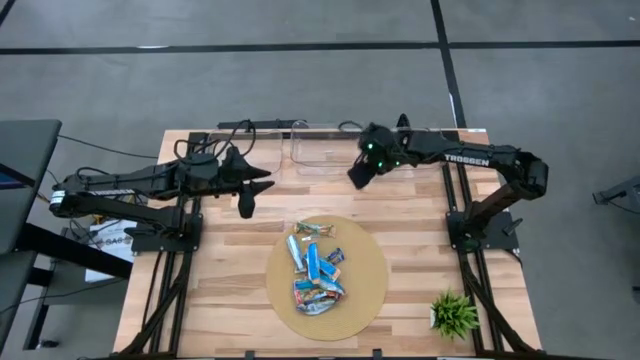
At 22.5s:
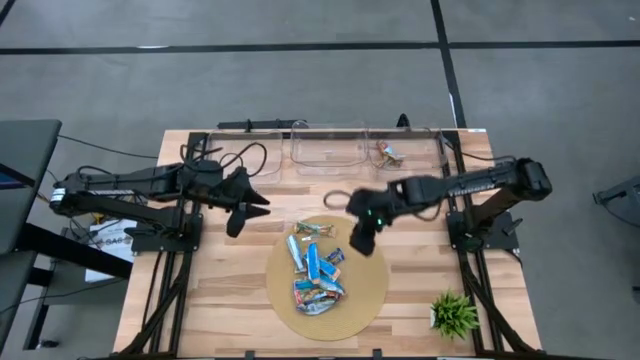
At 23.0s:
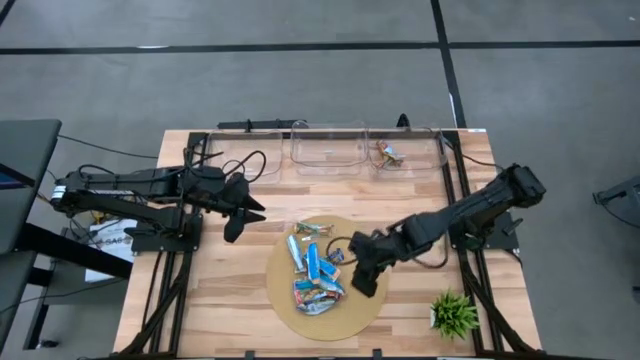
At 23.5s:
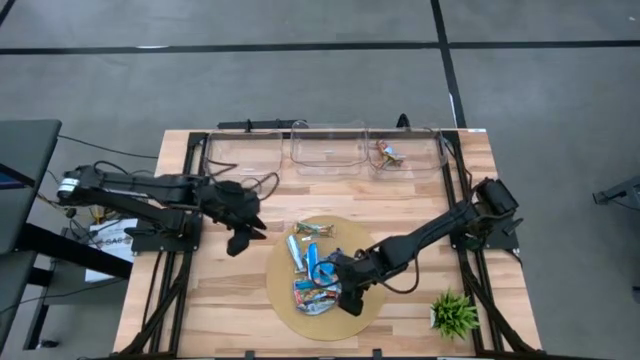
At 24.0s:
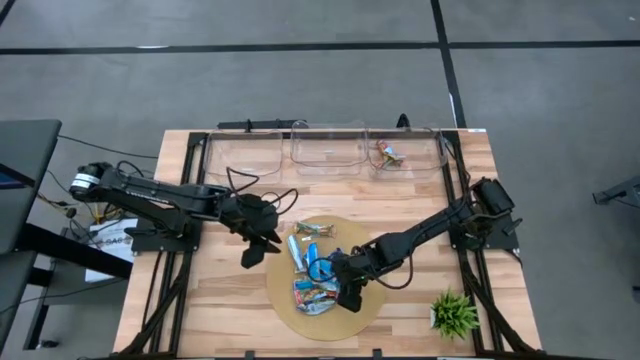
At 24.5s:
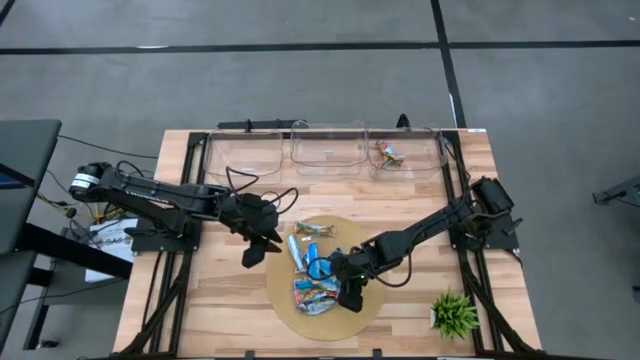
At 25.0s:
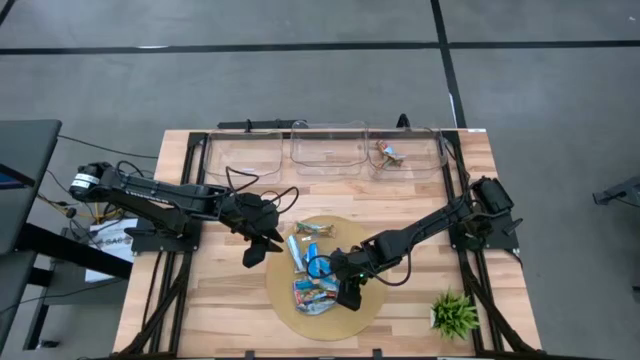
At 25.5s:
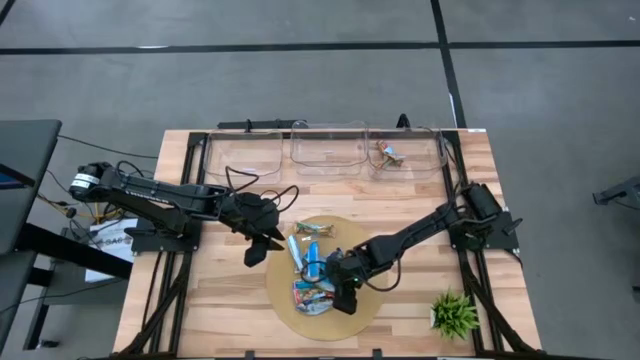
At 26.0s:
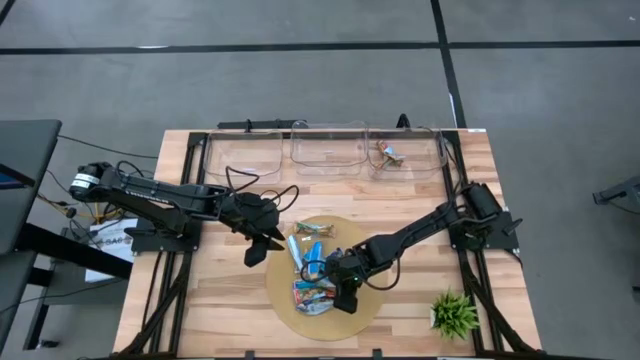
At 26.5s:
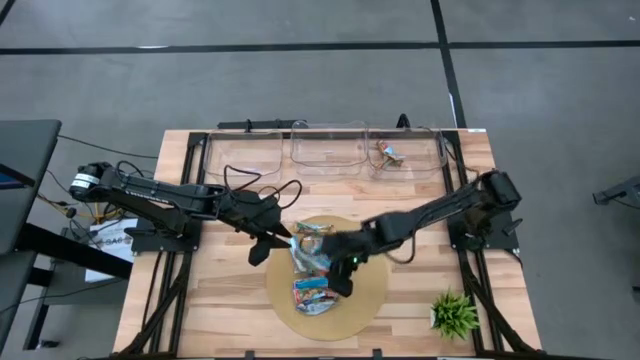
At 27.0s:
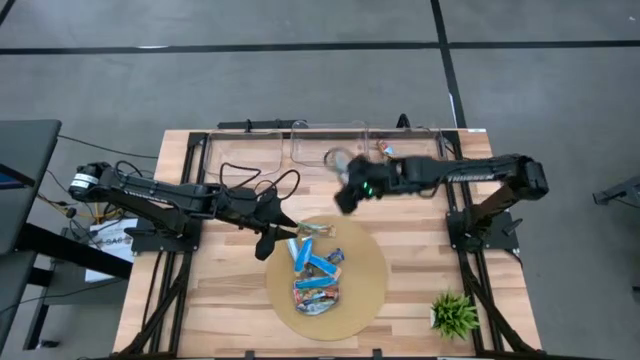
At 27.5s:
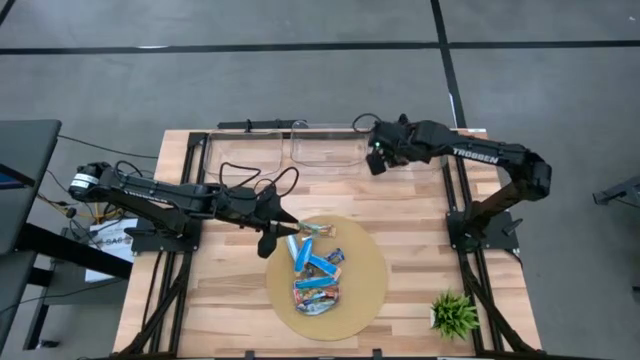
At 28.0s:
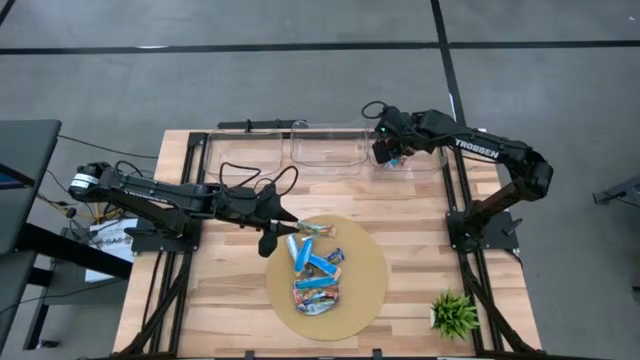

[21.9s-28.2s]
Task: Pick and place Granola Bars by type
Put the red granola bar into the right transparent bin

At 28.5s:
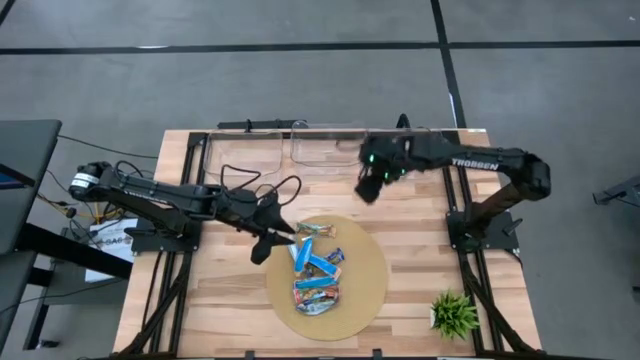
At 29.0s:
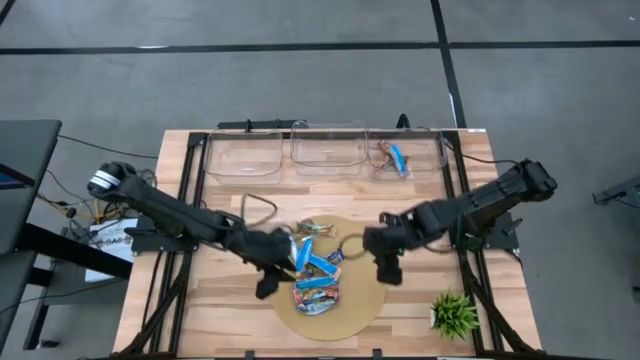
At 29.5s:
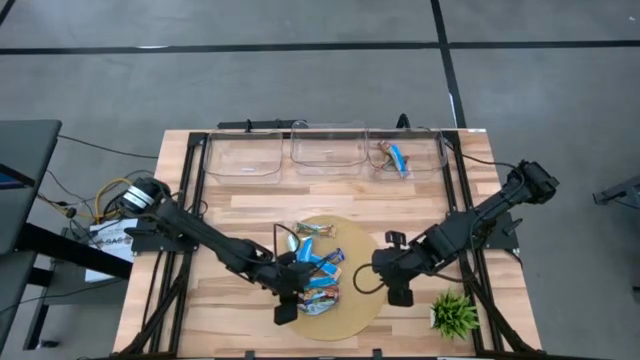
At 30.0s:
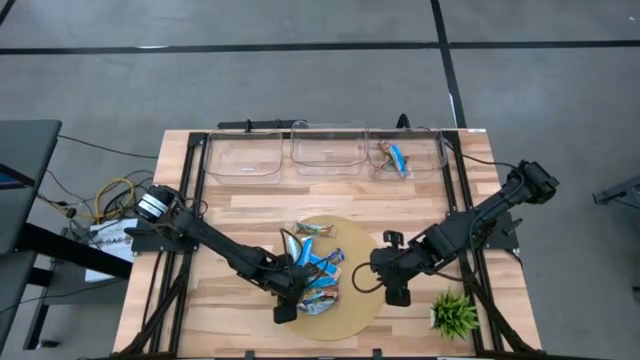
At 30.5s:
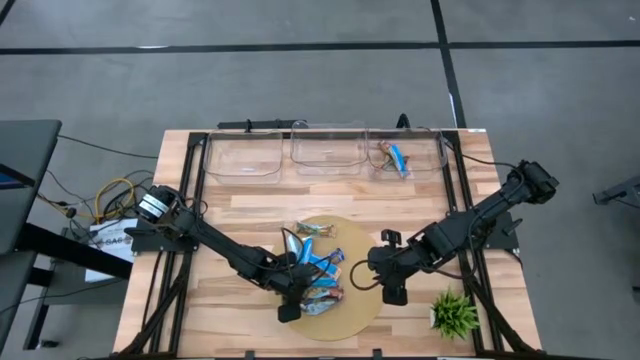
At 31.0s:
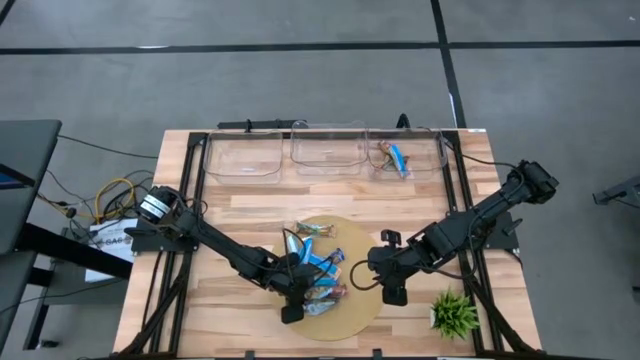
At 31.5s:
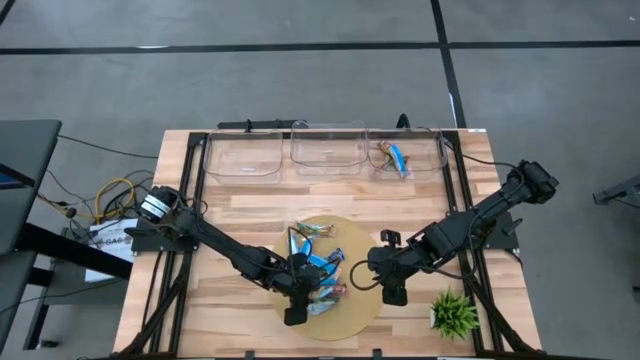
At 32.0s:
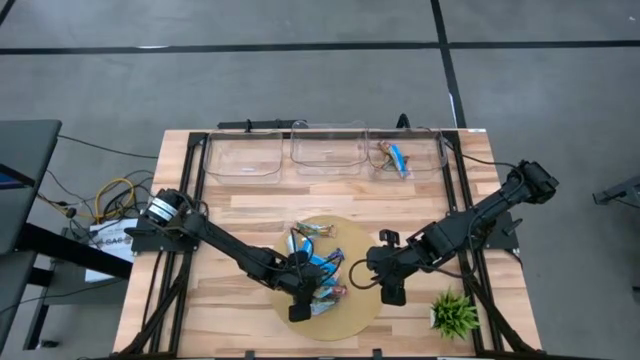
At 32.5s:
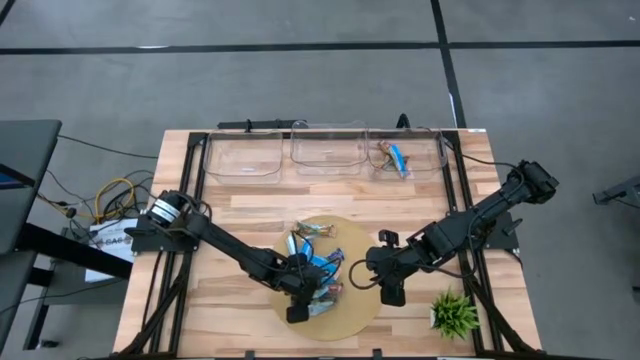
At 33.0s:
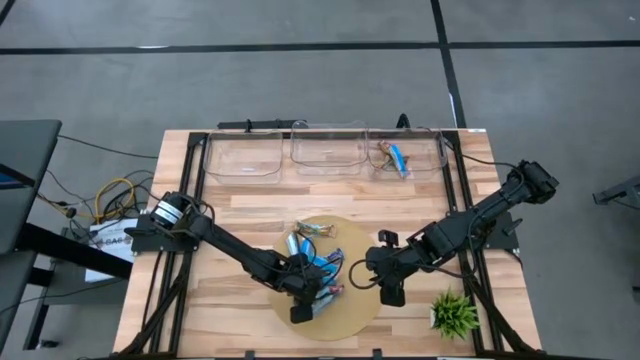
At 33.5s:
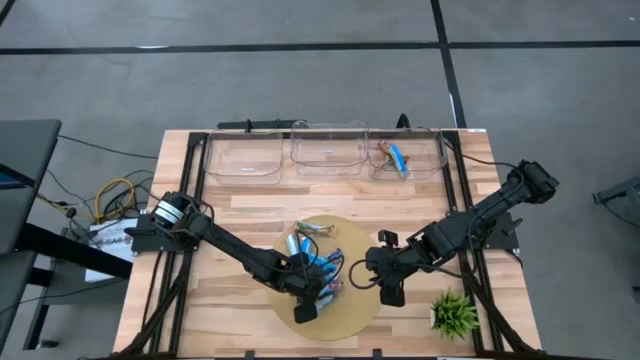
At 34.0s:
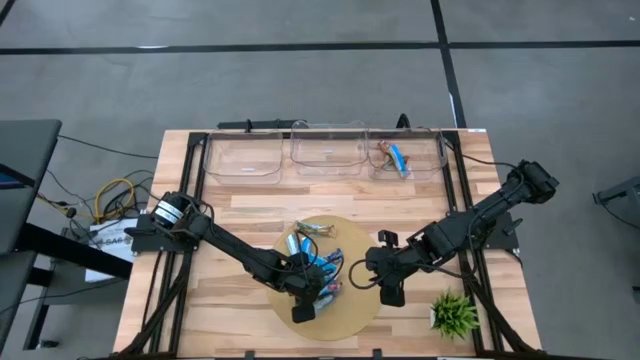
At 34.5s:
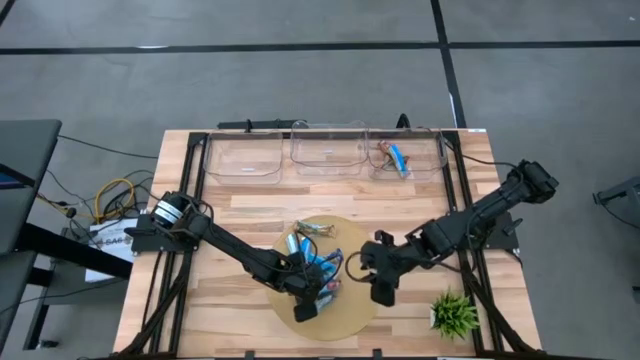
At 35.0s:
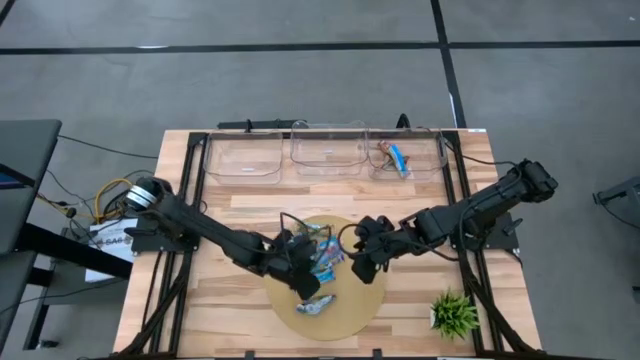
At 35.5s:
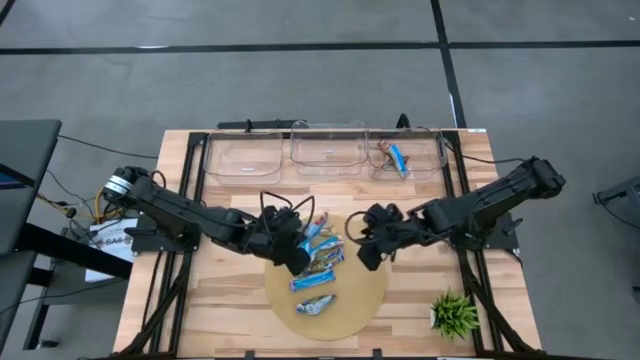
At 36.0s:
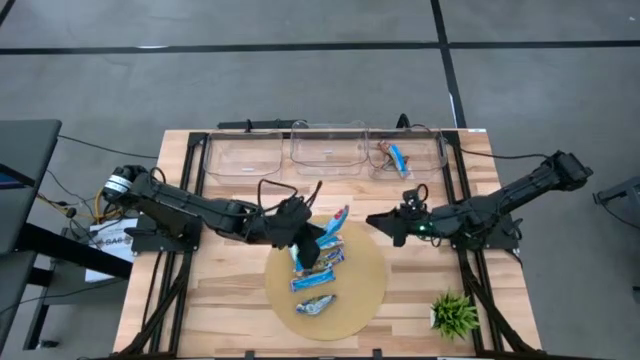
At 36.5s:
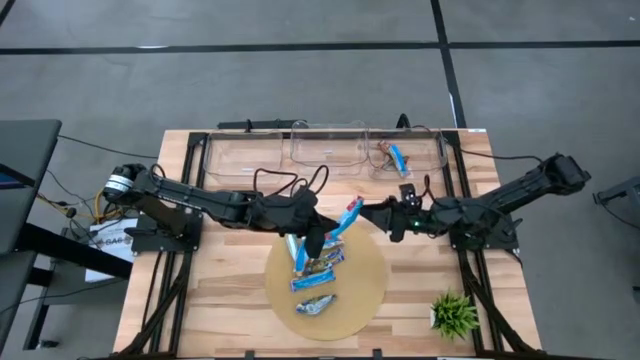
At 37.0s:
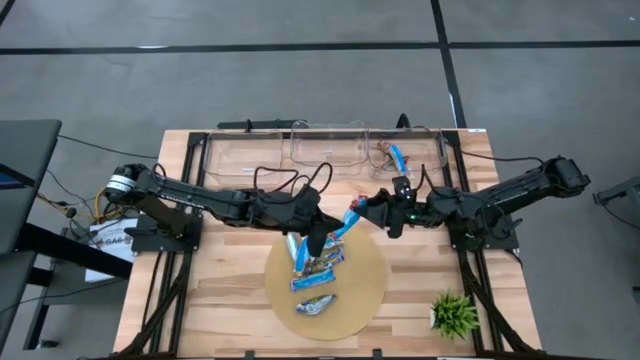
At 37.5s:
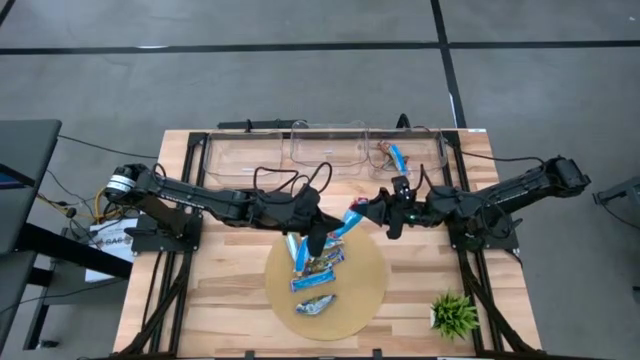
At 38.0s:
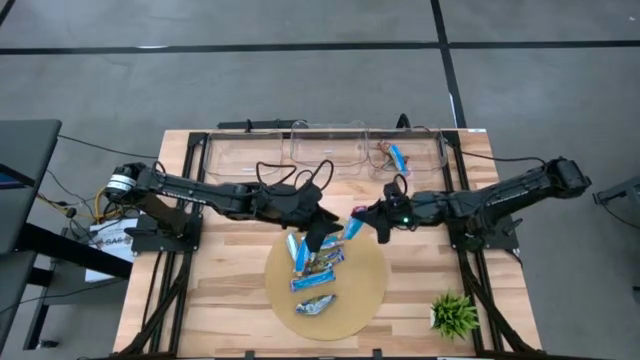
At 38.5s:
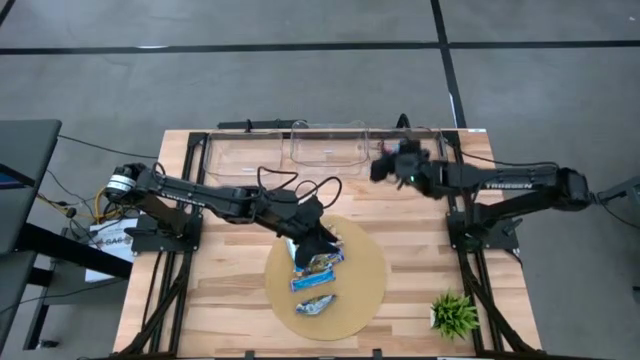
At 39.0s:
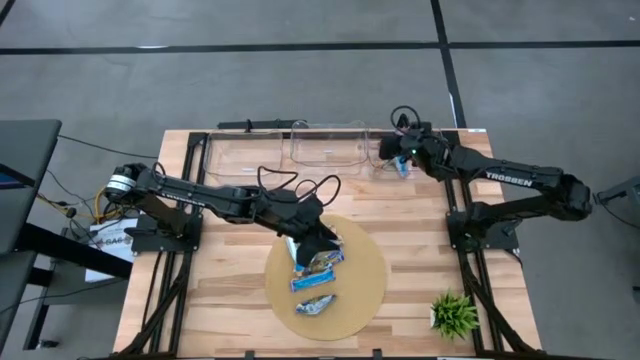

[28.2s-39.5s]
Put the red granola bar into the right transparent bin

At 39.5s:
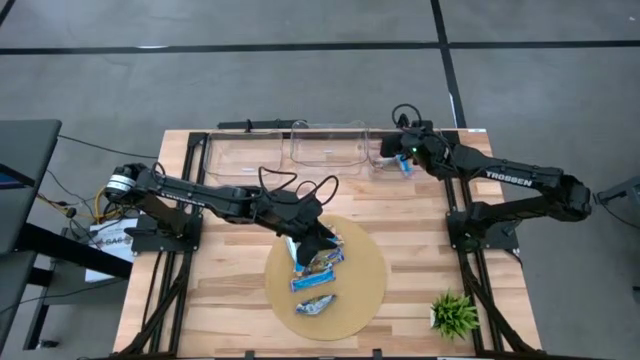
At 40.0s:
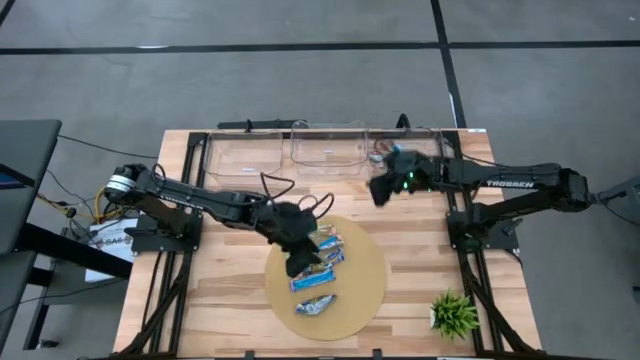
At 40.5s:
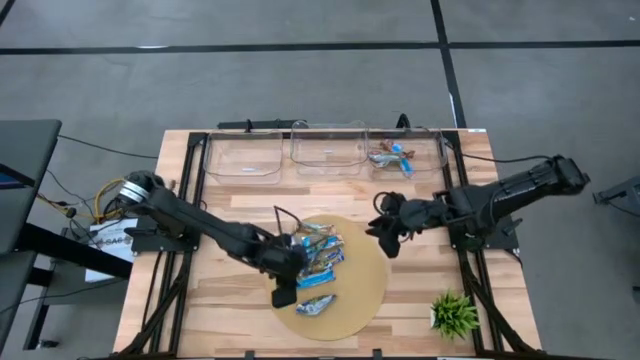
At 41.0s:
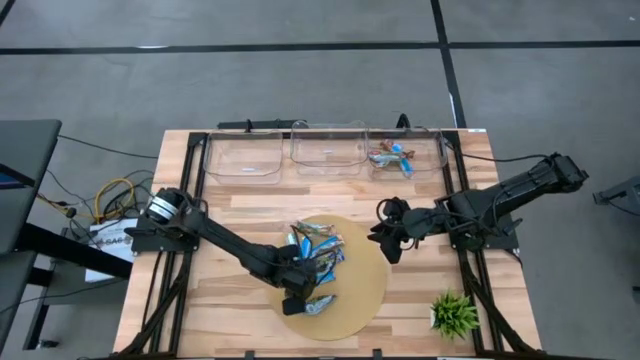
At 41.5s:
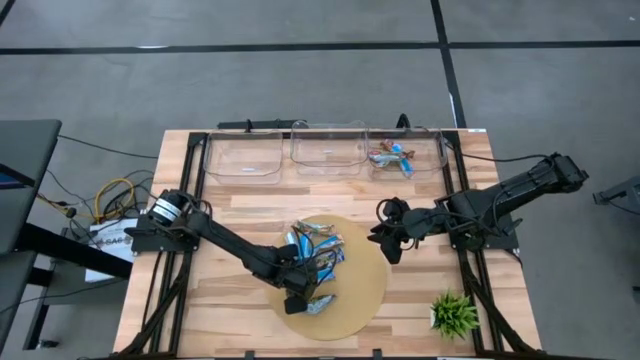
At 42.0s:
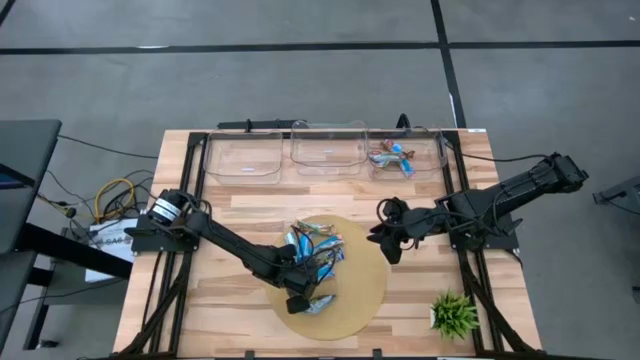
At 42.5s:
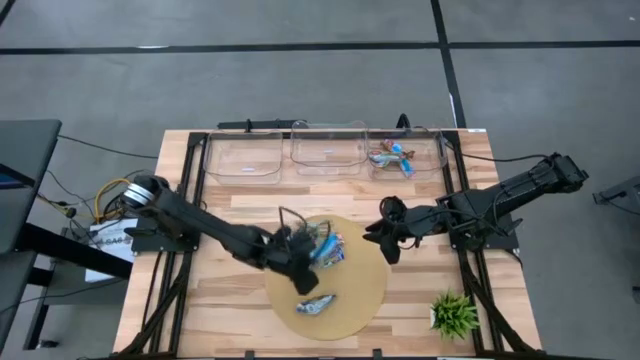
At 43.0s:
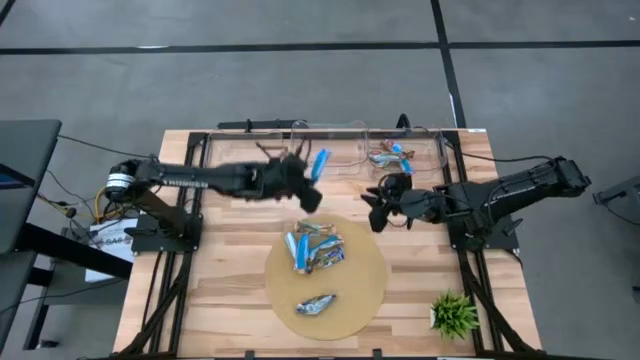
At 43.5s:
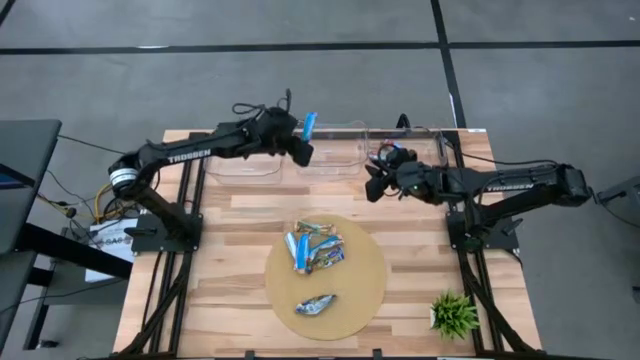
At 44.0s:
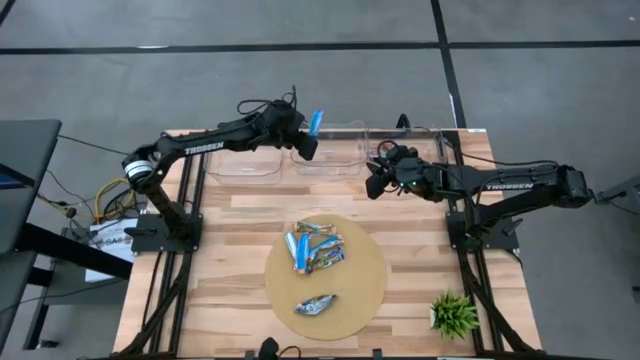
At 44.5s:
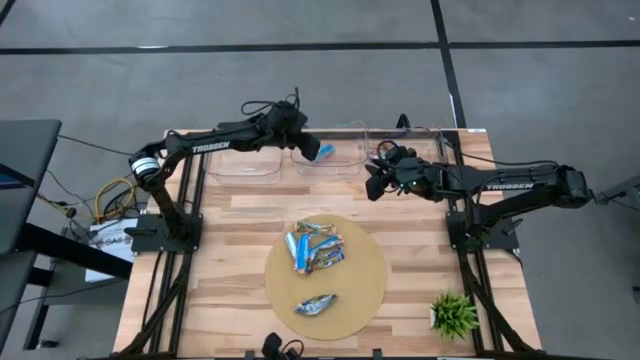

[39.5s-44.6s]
Put the blue granola bar into the center transparent bin
